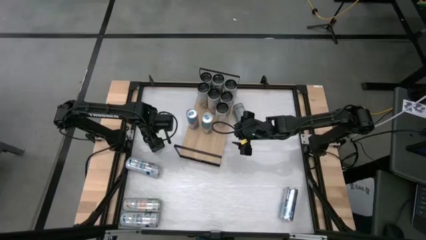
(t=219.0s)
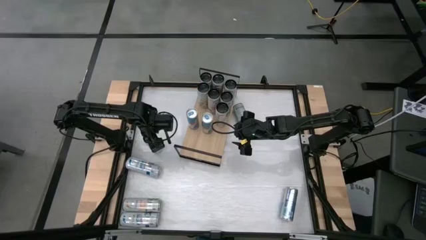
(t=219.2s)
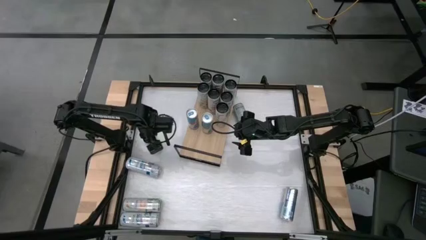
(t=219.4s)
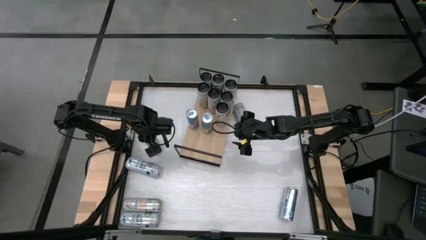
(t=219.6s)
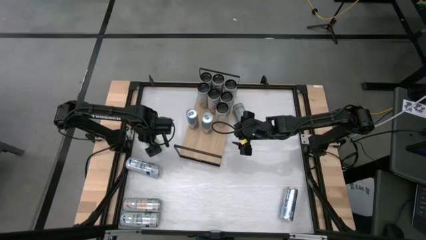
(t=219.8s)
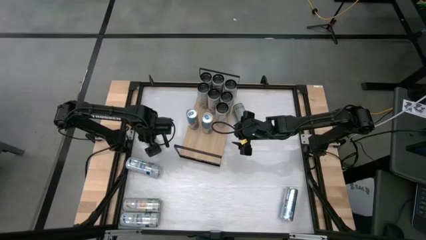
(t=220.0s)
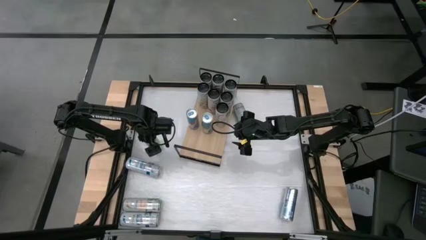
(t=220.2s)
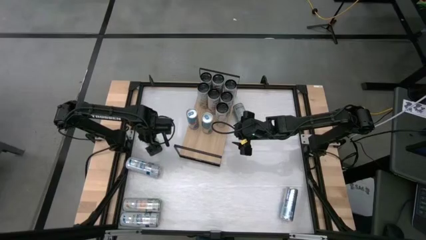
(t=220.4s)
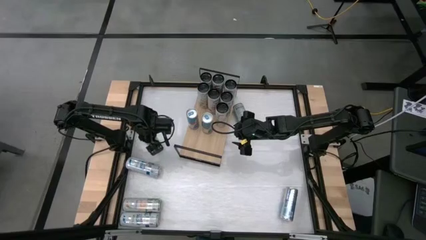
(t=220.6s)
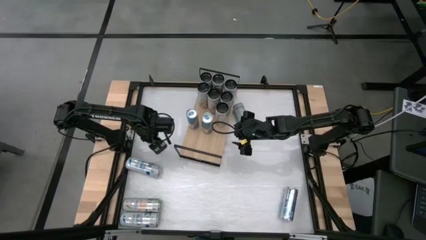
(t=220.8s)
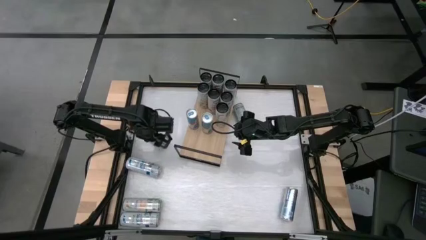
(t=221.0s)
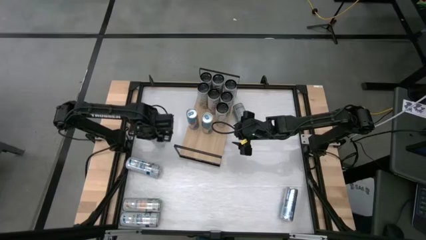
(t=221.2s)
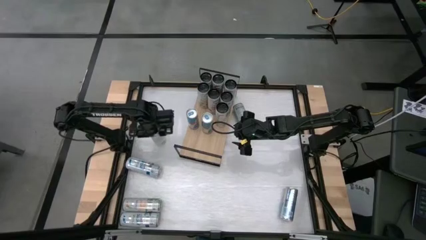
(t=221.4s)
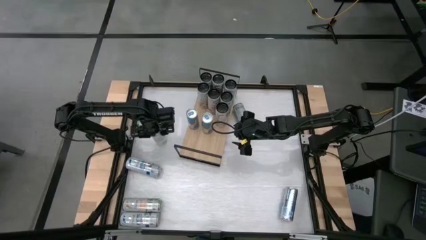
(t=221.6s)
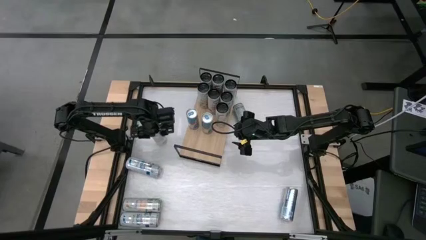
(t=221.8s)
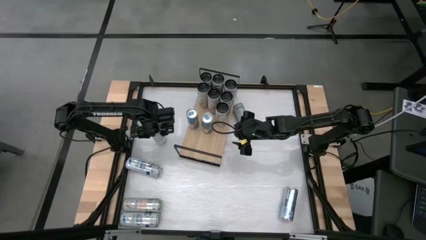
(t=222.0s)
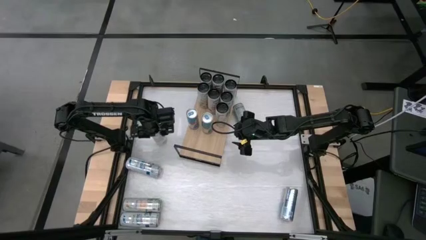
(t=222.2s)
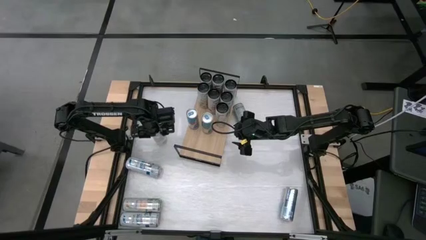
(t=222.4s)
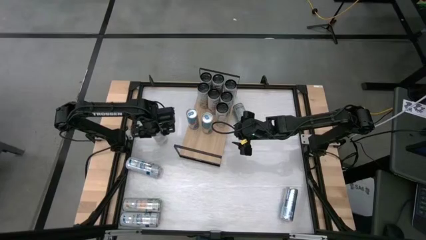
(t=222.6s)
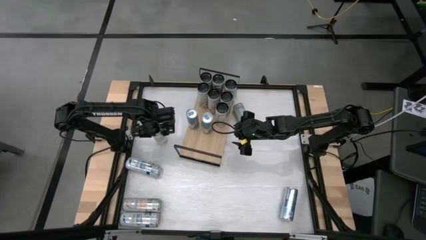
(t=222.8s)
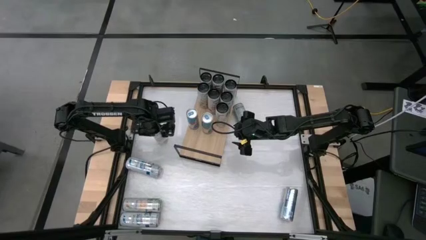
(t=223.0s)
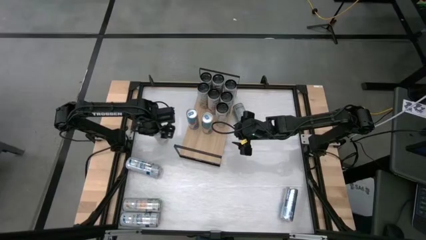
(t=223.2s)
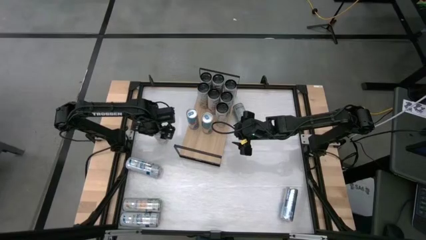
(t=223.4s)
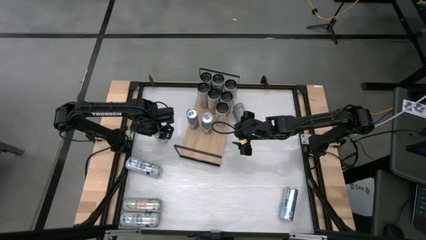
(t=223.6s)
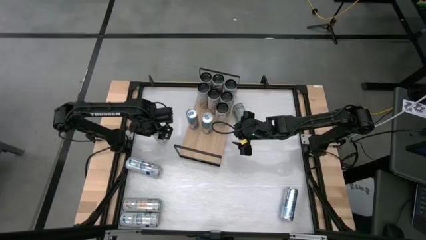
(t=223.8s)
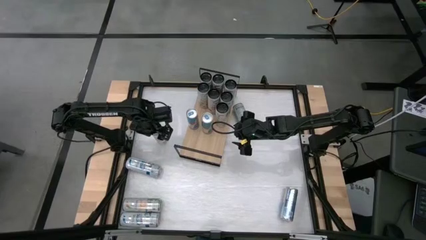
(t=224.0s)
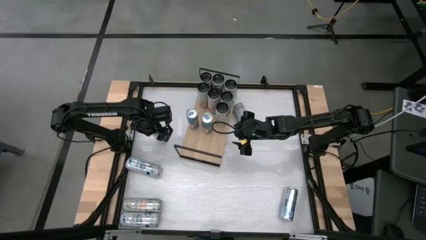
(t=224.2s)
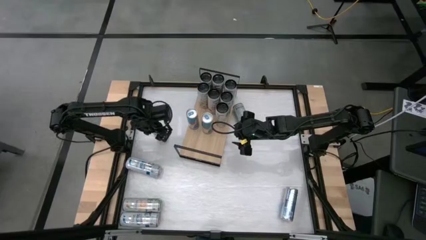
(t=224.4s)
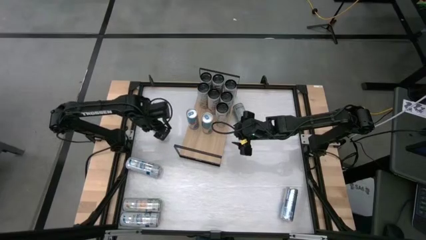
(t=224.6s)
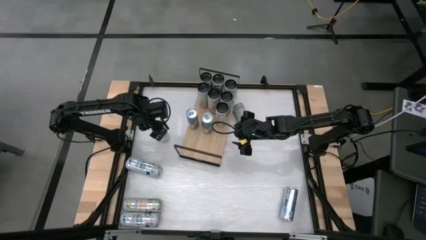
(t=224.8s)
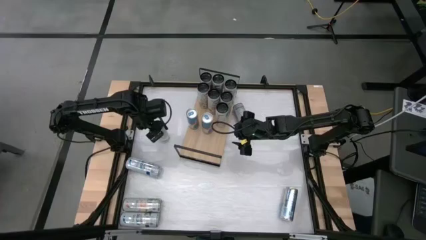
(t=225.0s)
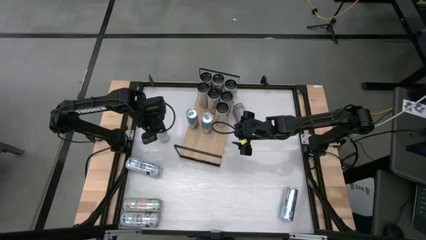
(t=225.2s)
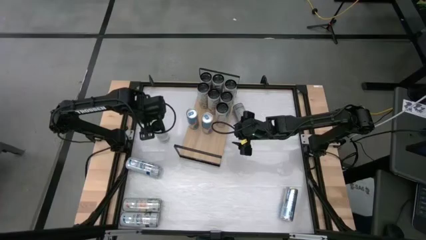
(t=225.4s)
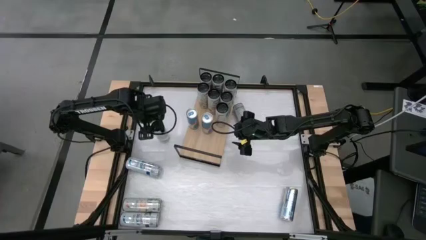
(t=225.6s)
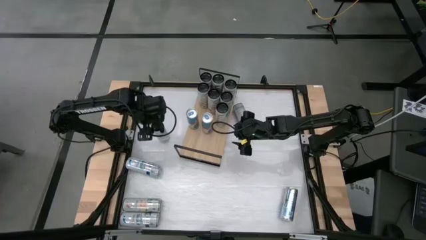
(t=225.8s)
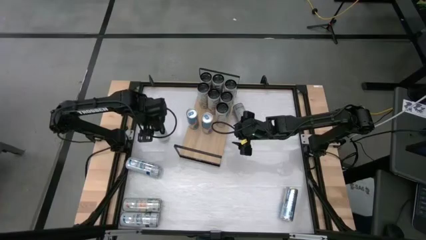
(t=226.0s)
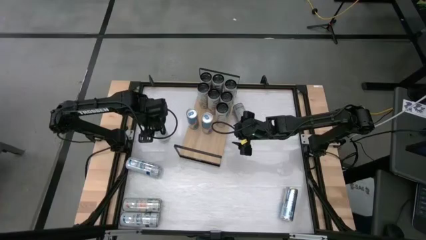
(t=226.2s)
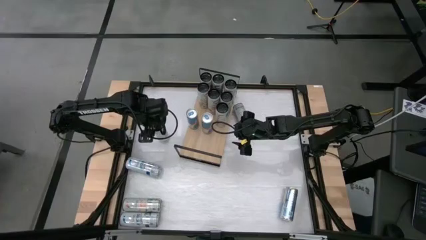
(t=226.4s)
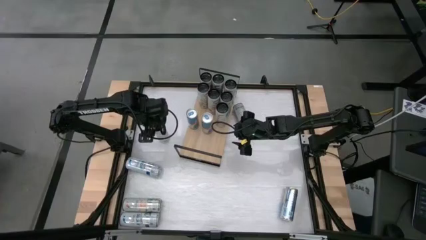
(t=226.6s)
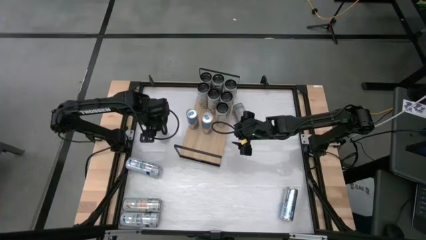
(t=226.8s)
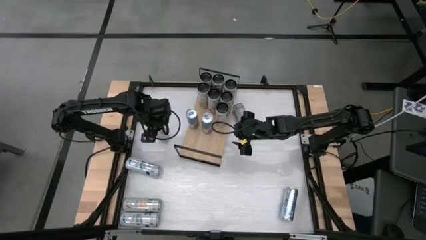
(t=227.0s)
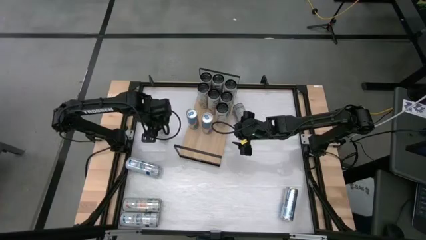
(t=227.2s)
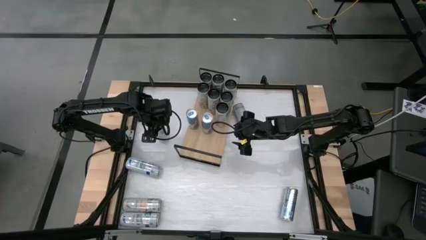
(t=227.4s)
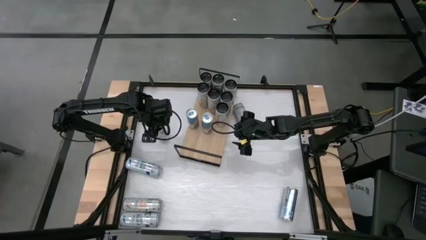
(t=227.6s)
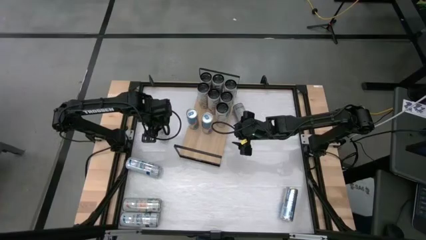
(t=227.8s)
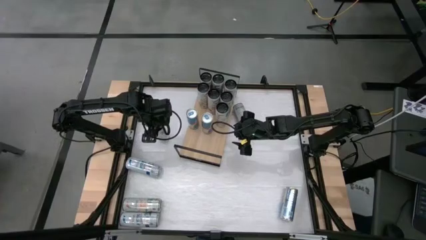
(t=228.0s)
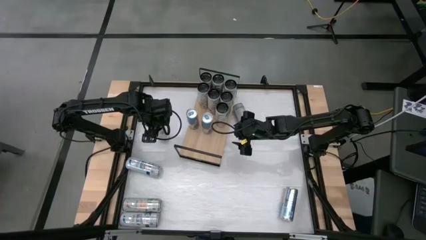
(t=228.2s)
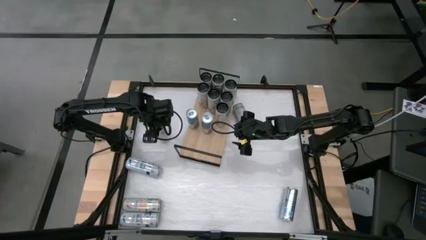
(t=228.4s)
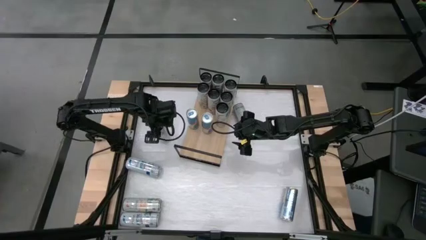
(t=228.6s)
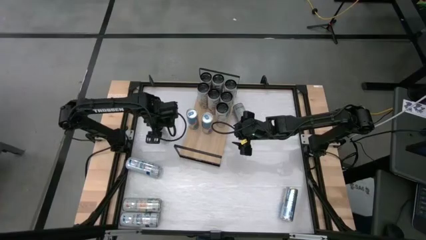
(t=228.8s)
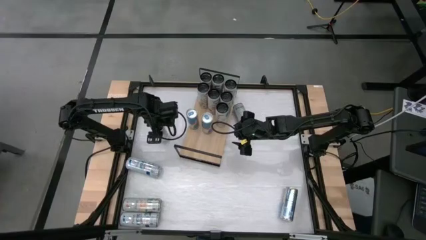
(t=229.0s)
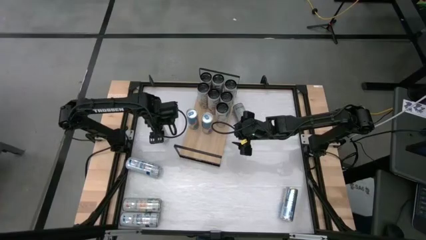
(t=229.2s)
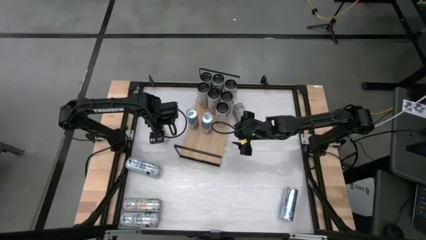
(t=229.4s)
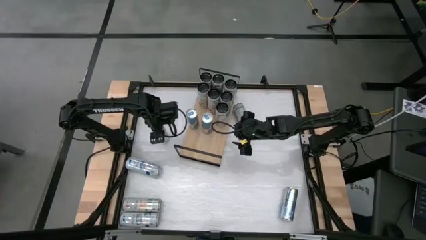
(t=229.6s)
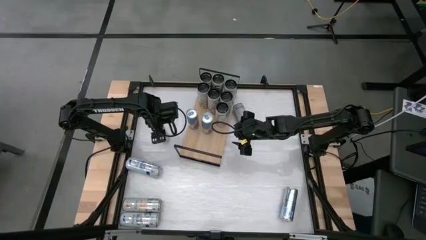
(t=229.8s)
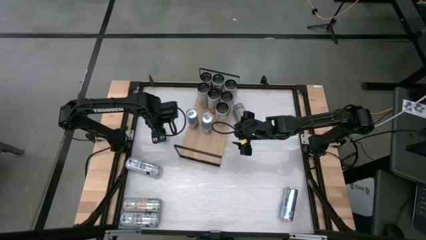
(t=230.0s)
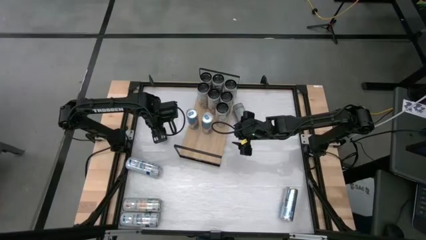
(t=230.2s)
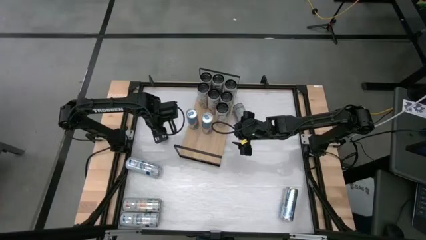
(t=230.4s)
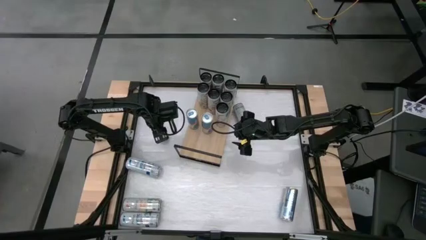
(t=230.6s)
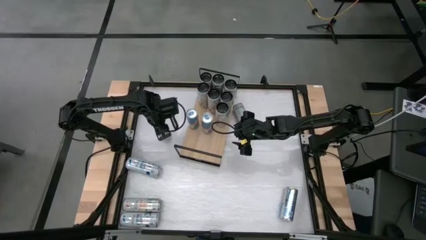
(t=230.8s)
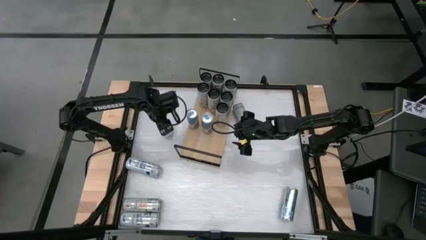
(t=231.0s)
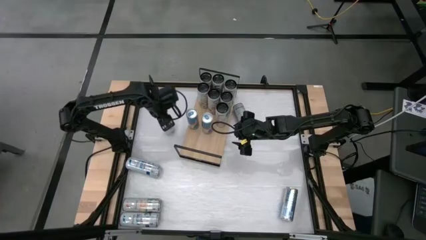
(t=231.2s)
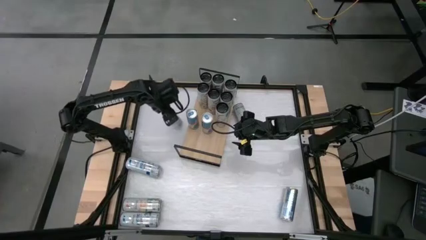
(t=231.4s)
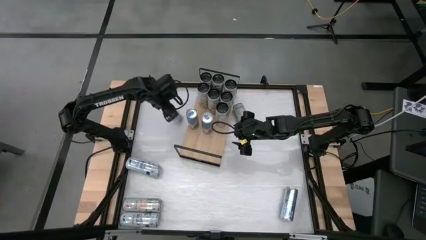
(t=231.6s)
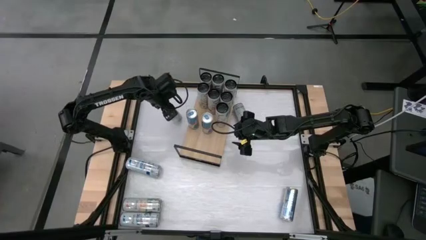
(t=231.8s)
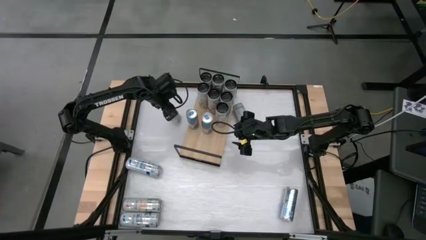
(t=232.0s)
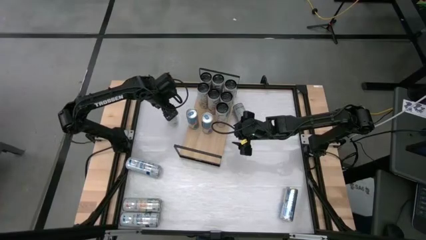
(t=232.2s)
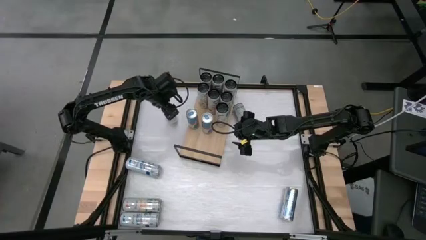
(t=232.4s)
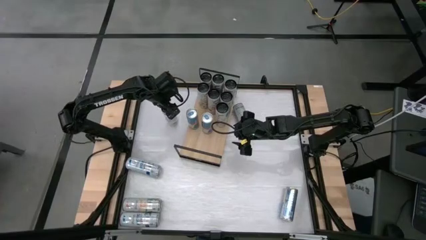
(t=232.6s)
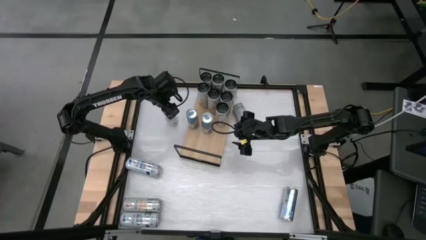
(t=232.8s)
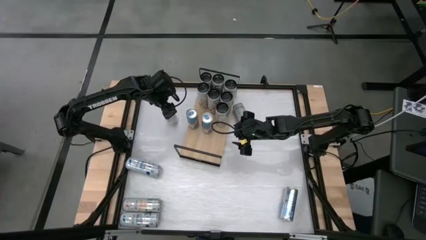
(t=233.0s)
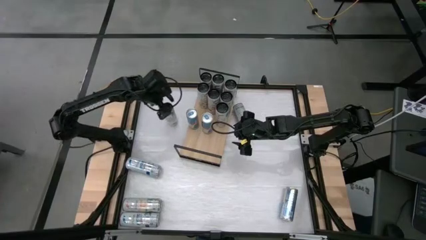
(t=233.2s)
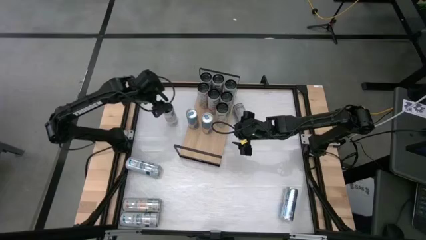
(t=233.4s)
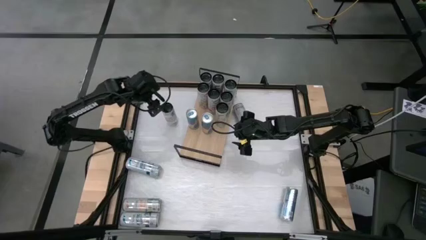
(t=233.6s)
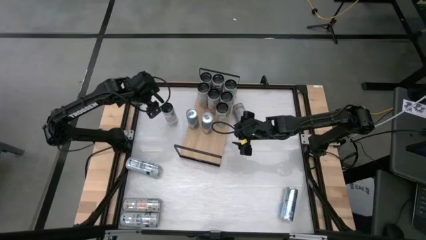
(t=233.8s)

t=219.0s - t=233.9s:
Task: Place canned beverage on shelf
Put the bottom left pink soda can on the shelf aligned with the other pink soda can
